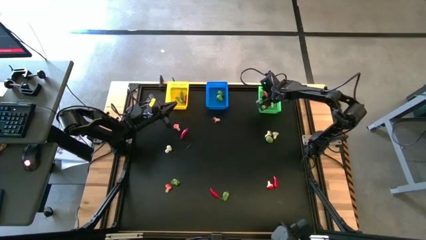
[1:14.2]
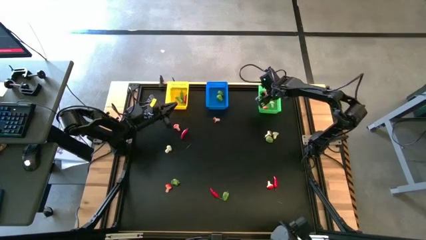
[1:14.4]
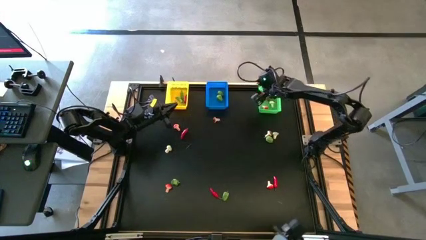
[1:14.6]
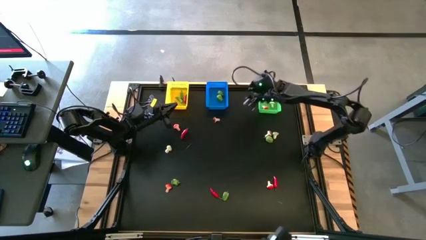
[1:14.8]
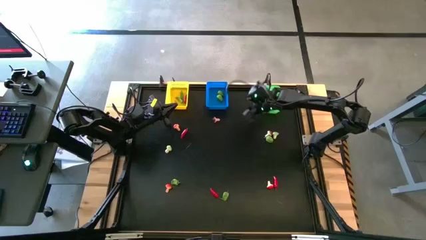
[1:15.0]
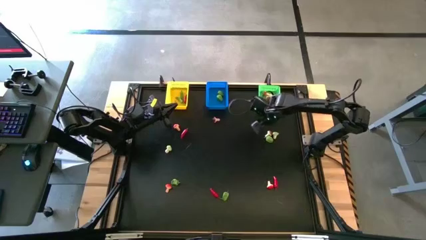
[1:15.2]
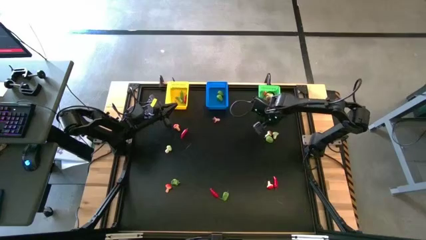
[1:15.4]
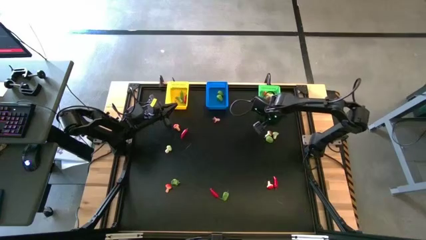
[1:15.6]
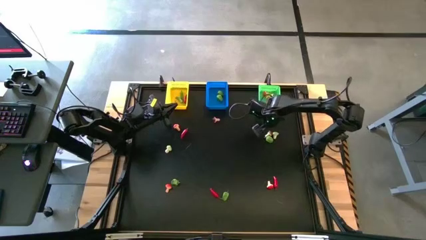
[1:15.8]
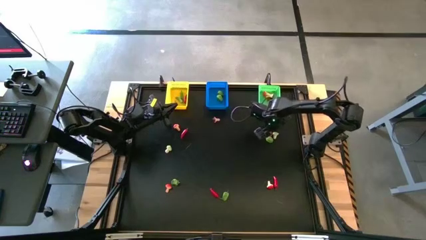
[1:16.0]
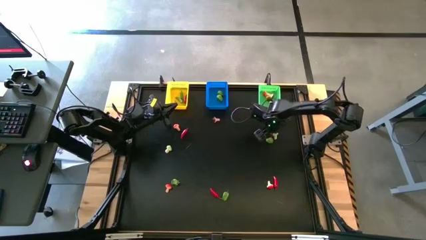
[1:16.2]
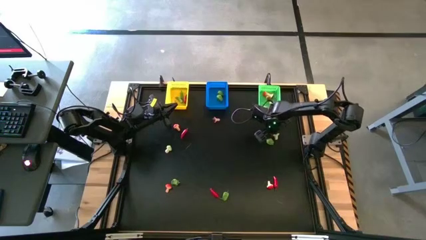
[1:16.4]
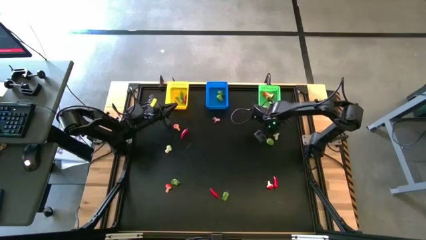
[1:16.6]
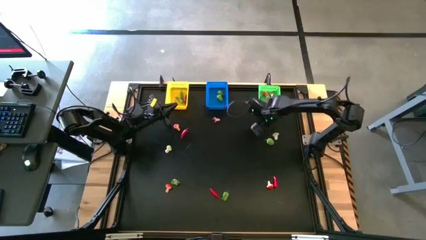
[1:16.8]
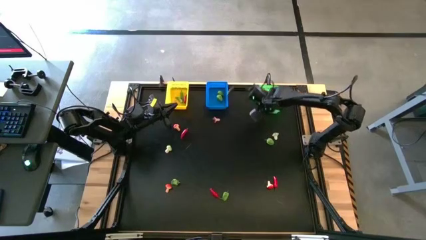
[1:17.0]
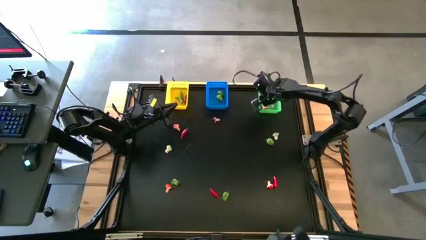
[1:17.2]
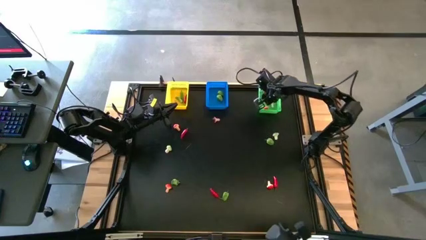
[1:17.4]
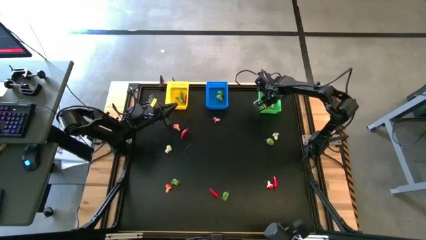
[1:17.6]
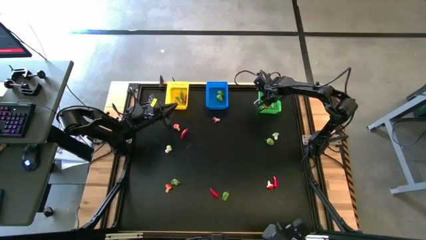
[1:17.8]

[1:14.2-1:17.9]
Task: Sort produce into baskets
Put the brown mushroom into the green bin

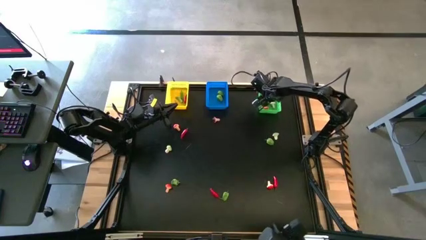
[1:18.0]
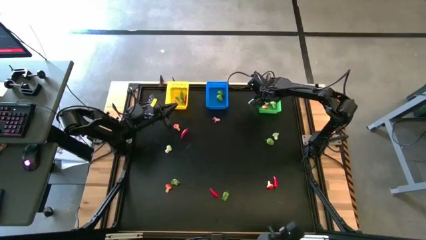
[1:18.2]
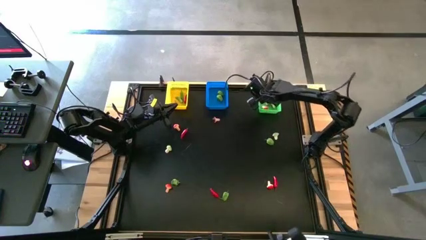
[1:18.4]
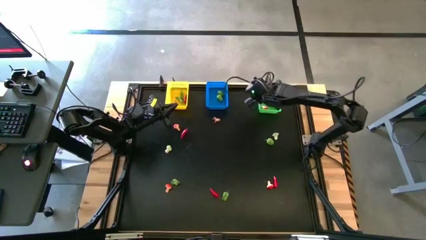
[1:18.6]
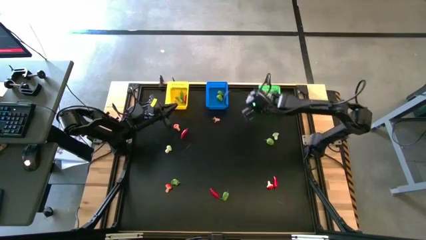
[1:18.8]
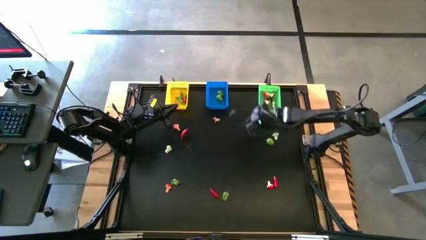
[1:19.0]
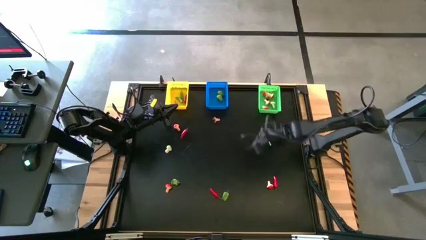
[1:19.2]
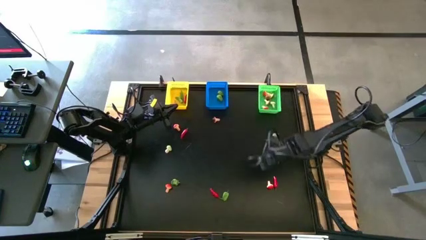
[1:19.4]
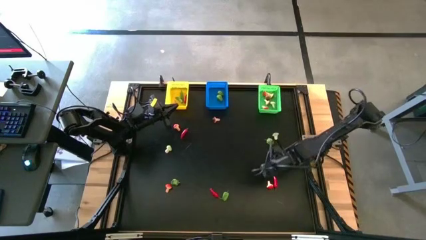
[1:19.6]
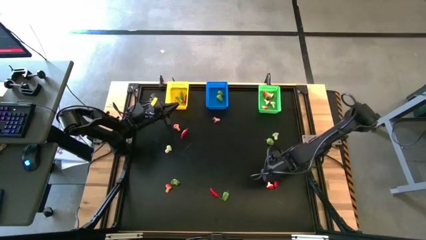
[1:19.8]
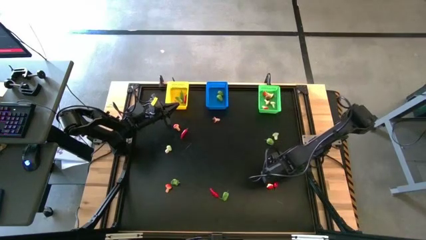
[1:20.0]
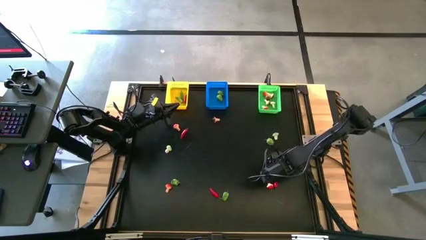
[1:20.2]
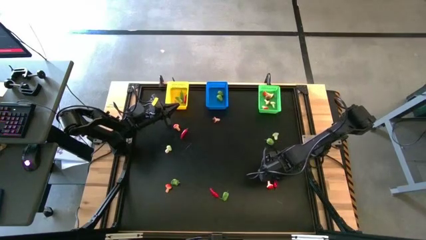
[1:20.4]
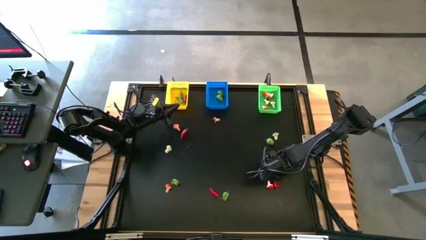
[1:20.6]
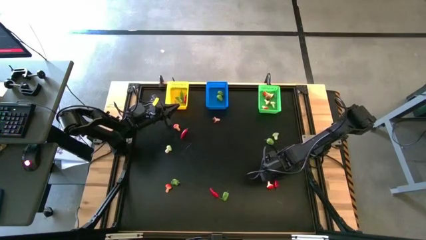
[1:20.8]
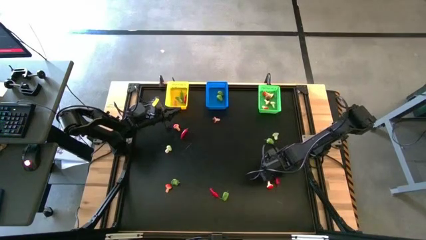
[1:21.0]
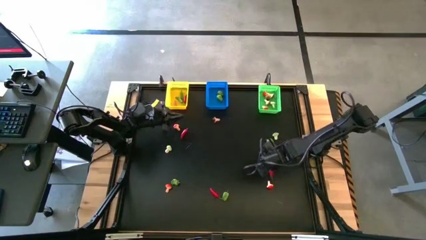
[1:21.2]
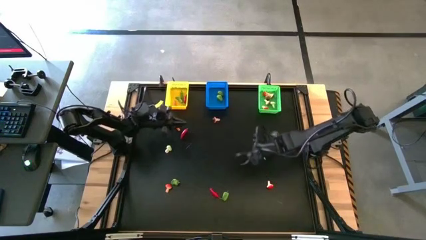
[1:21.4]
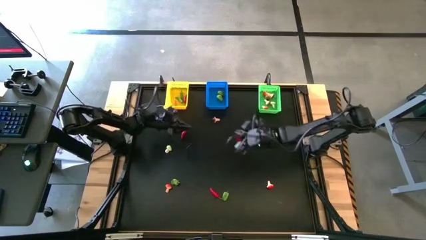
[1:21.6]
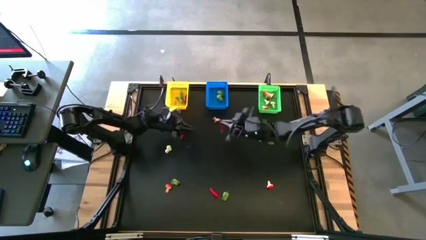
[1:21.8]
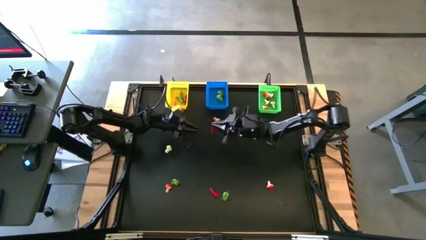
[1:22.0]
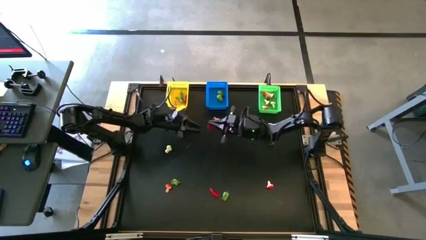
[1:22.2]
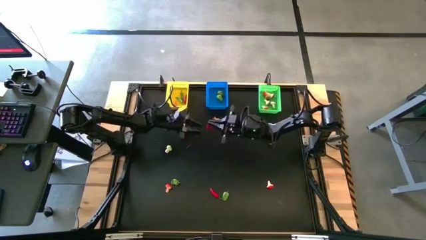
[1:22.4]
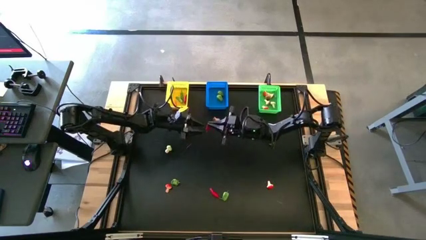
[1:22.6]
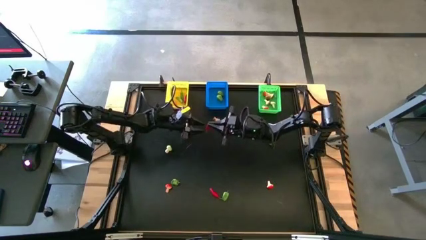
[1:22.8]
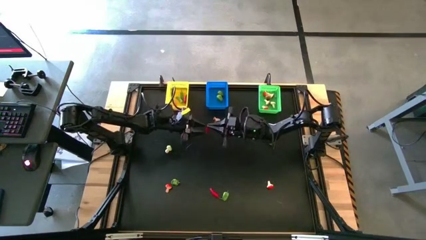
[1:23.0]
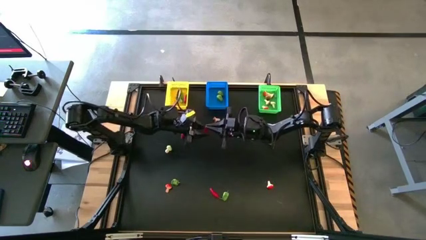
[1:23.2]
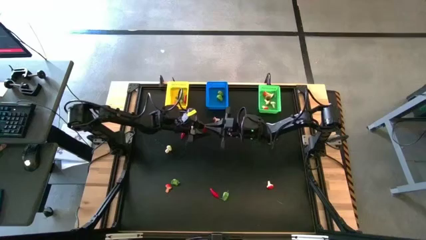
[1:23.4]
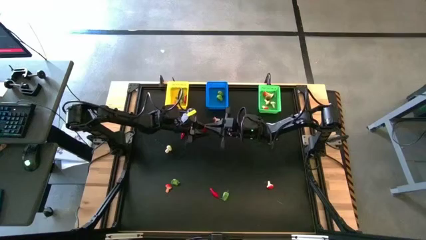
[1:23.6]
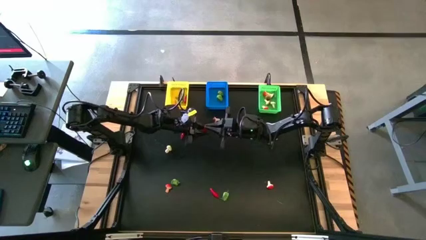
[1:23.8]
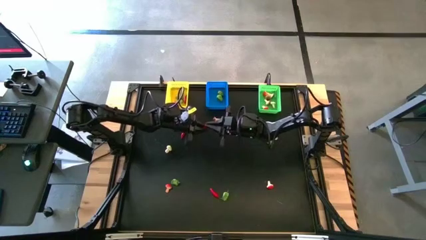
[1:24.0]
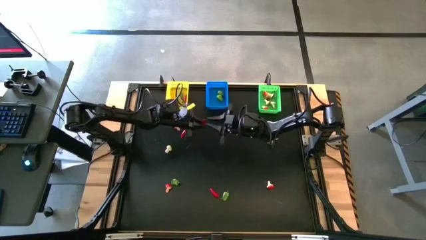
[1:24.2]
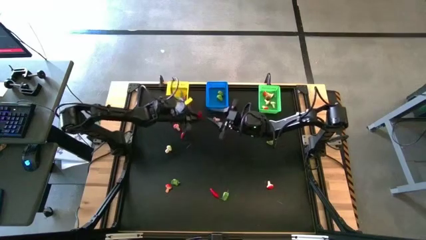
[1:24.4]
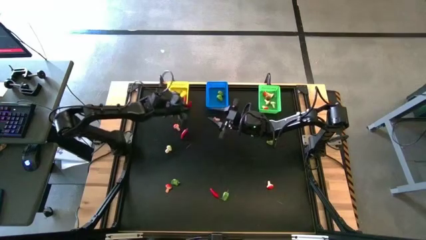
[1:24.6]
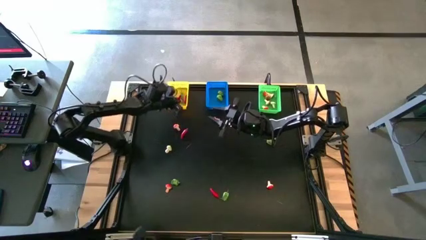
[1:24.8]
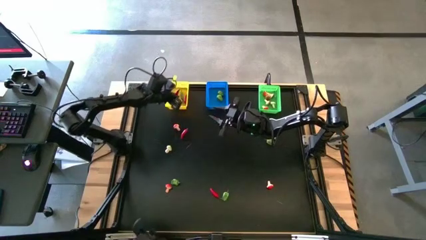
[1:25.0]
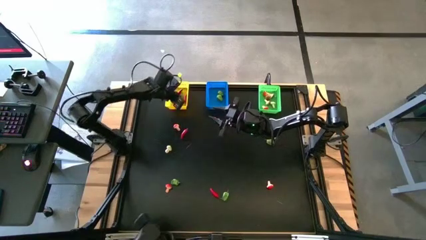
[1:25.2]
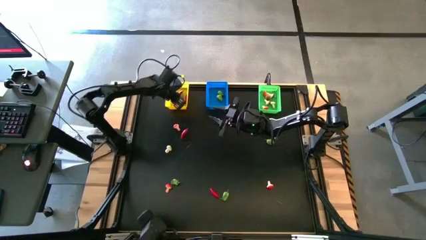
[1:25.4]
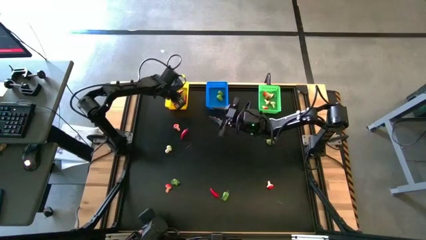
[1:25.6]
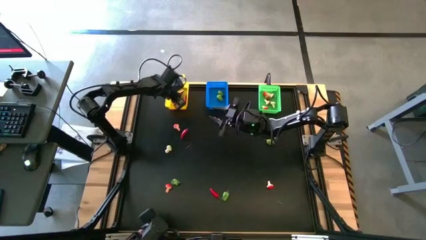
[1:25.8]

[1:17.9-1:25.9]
Put the red chili pepper into the yellow bin

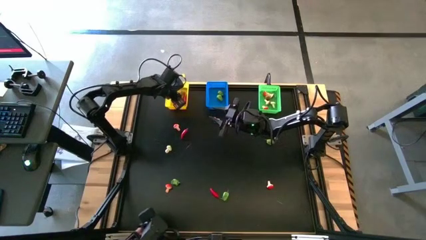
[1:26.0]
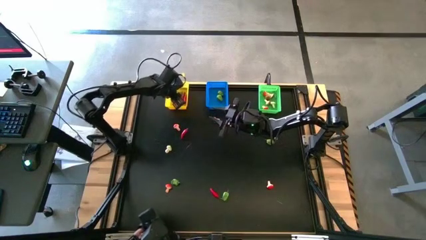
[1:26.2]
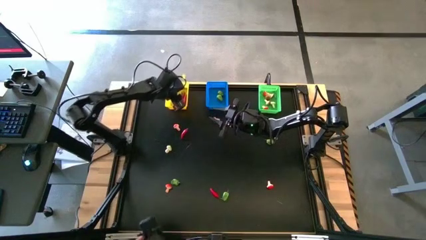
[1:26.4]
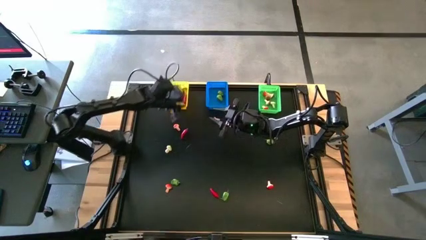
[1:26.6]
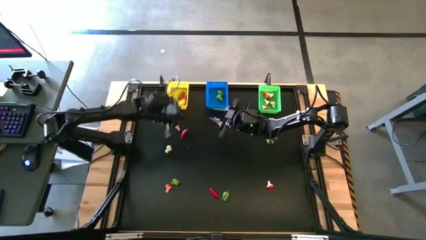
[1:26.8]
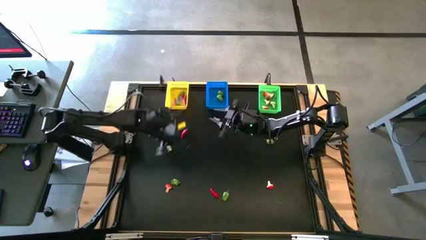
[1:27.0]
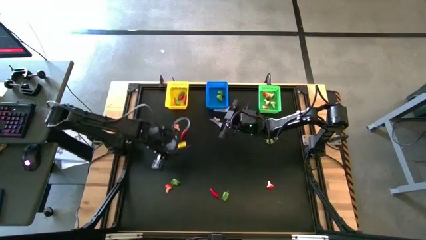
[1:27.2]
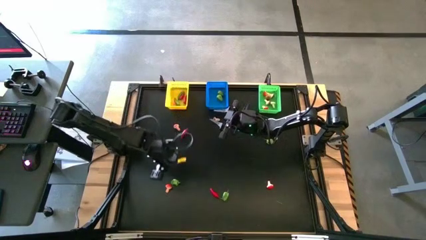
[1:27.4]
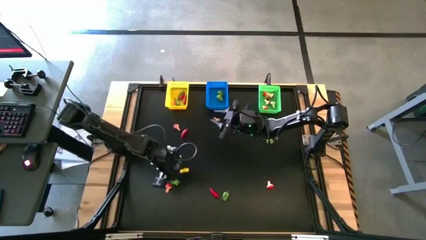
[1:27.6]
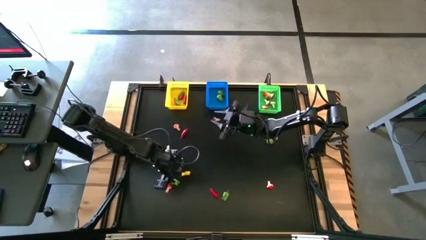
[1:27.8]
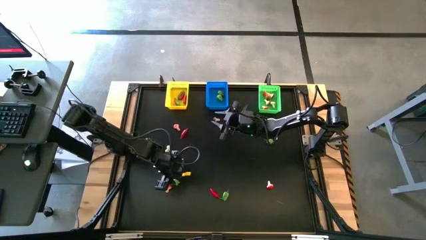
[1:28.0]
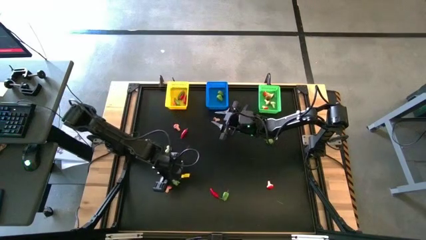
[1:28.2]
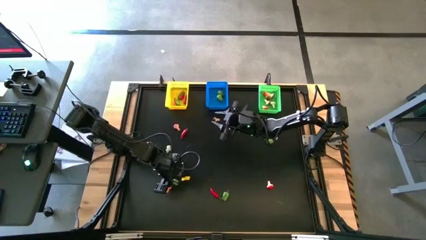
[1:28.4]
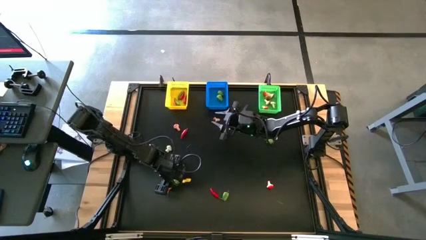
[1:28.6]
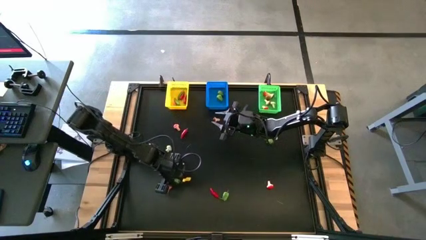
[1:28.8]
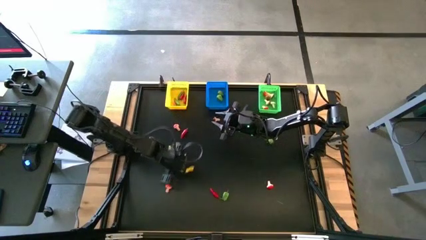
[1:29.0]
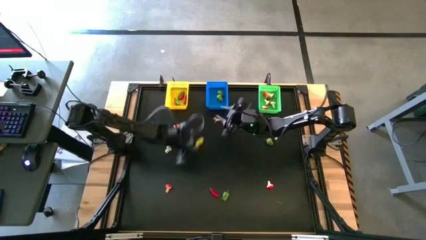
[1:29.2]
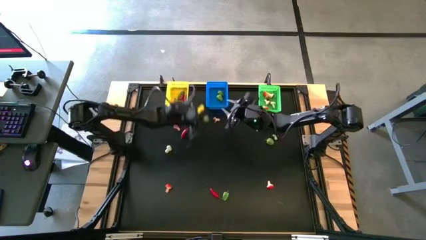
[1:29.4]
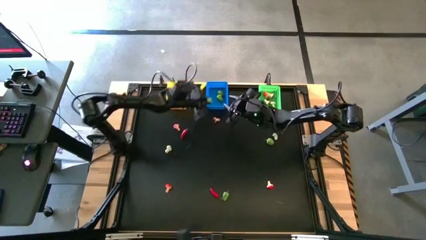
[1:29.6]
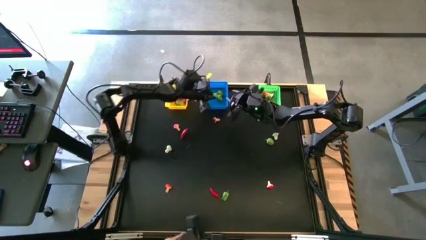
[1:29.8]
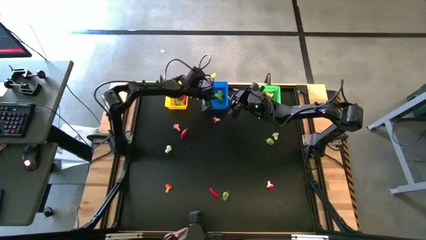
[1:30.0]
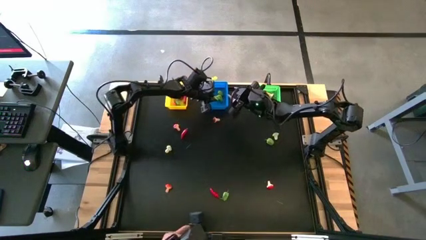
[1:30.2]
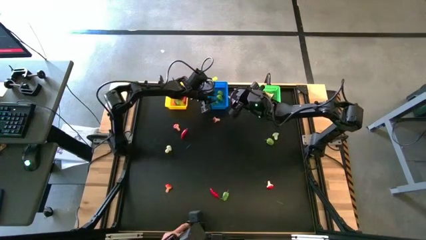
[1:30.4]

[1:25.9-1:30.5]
Put the green chili pepper into the blue bin
